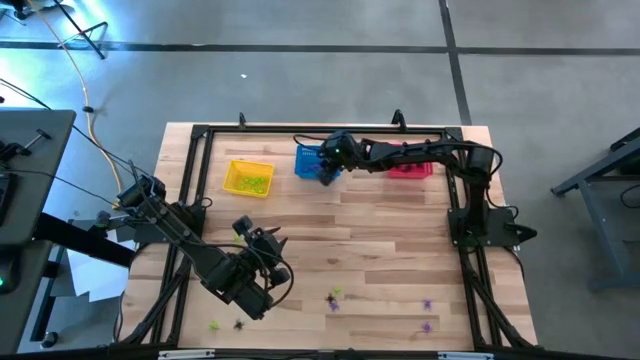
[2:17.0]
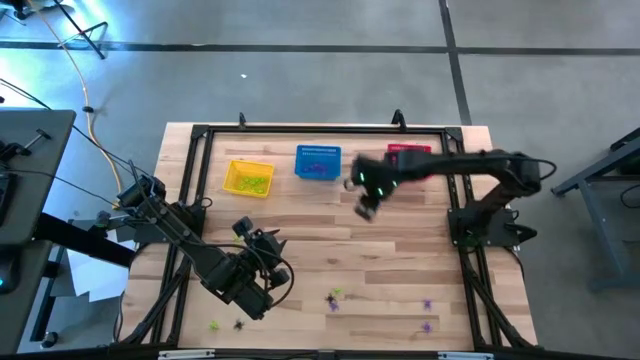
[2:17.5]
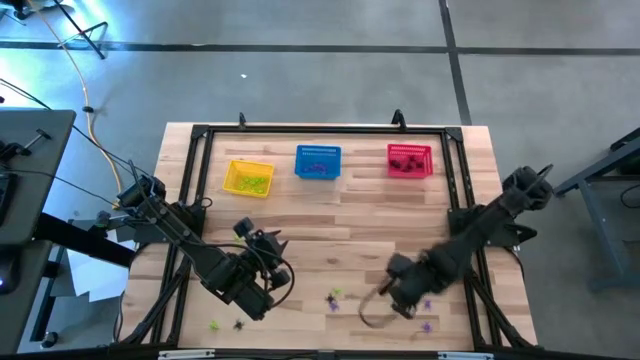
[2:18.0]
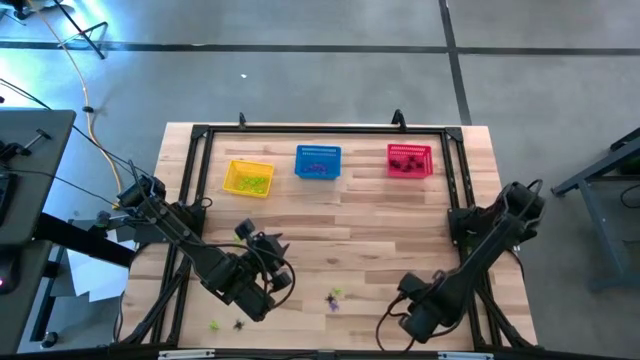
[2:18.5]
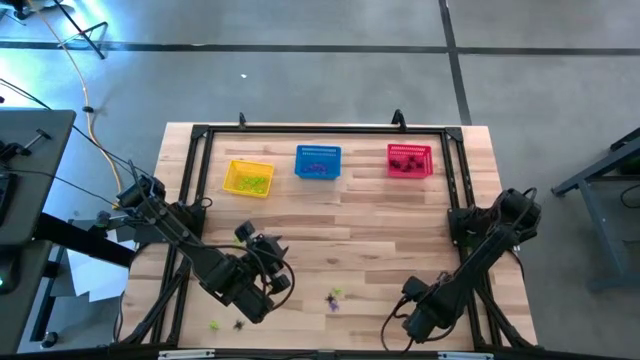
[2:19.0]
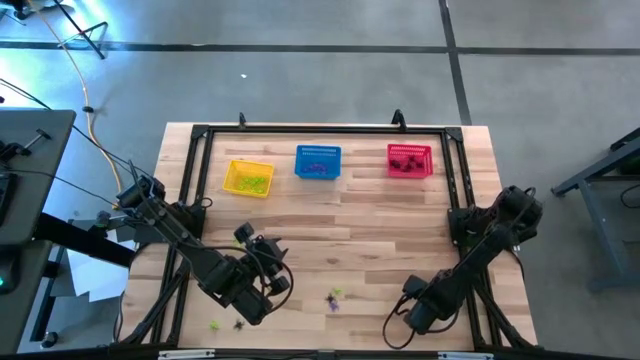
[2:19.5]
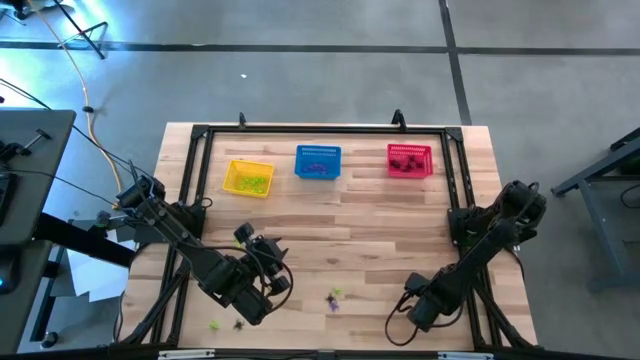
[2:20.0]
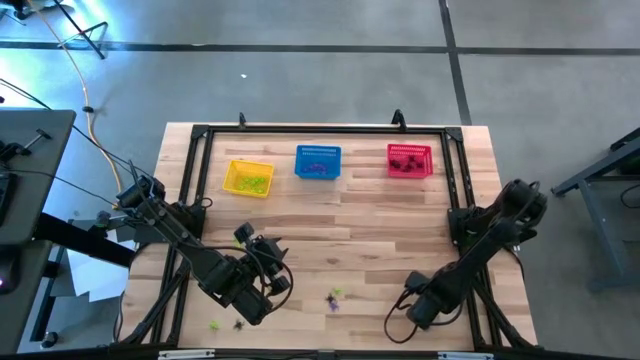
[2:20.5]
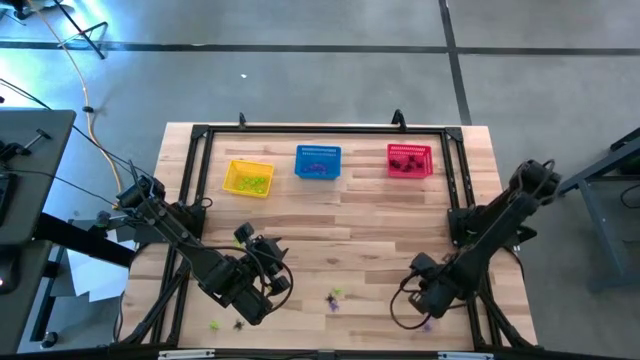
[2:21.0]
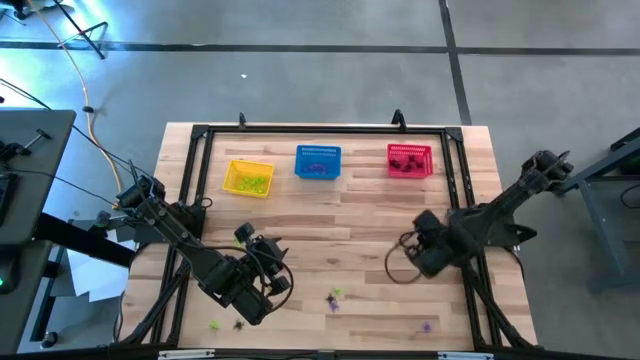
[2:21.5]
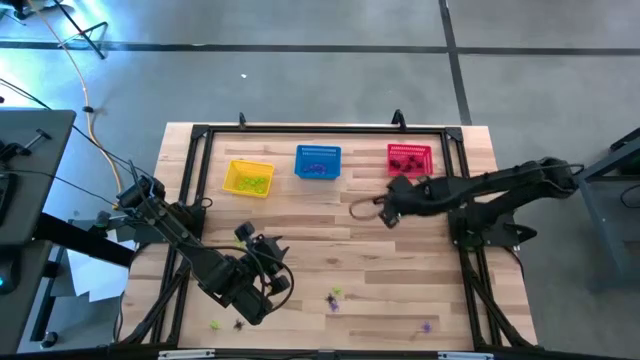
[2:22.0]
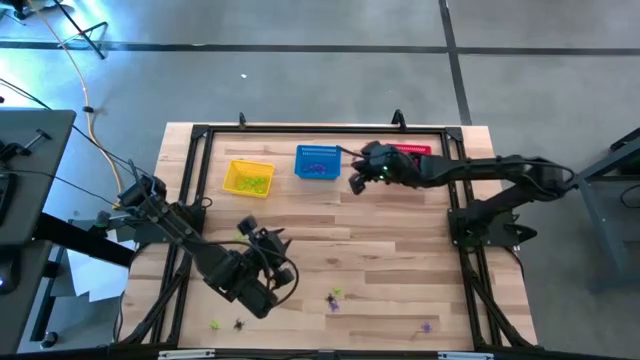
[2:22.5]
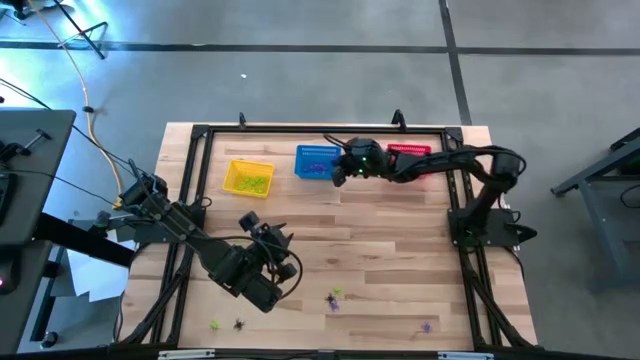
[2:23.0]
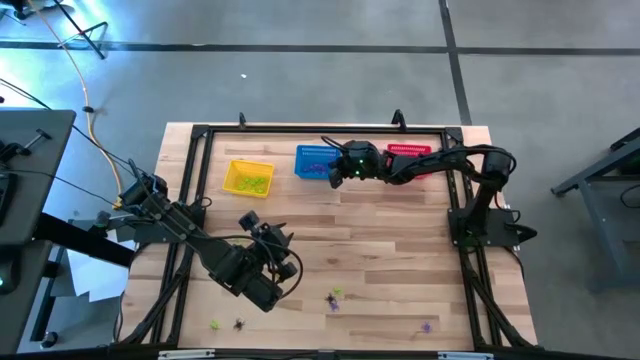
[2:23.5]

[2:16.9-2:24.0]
Task: Sort Halloween decoration
Put the purple spider toy into the blue bin

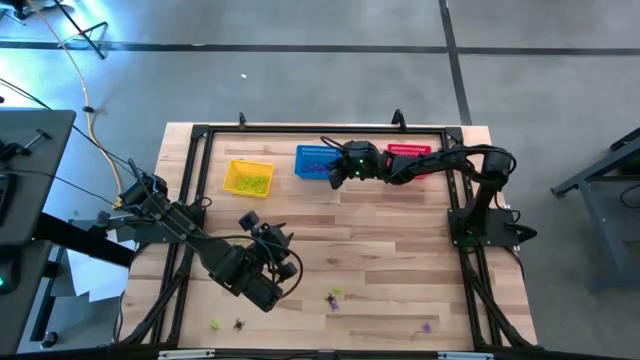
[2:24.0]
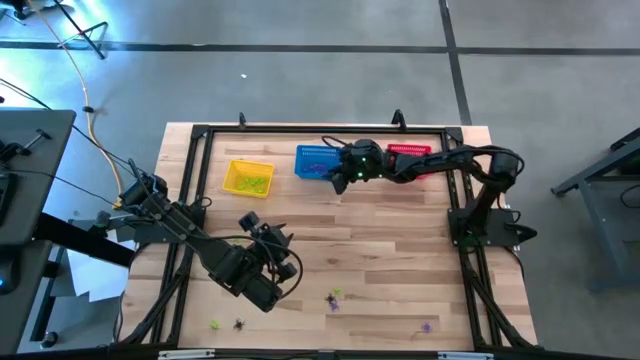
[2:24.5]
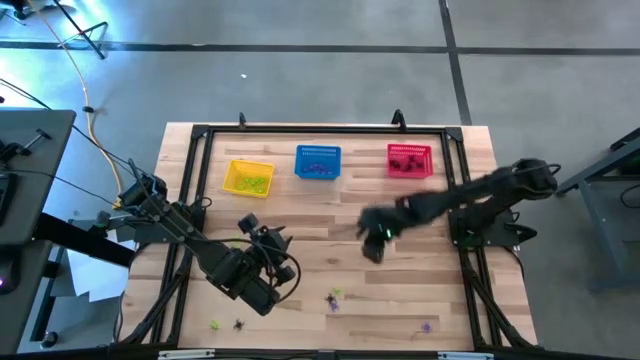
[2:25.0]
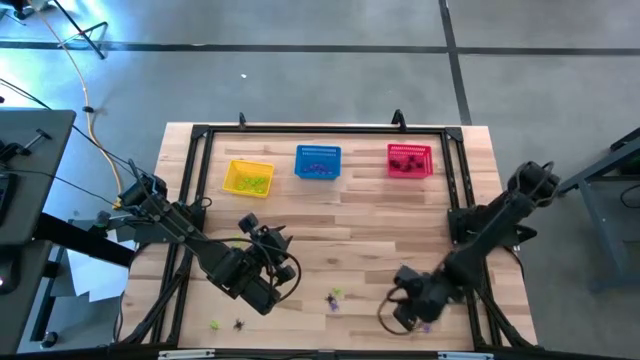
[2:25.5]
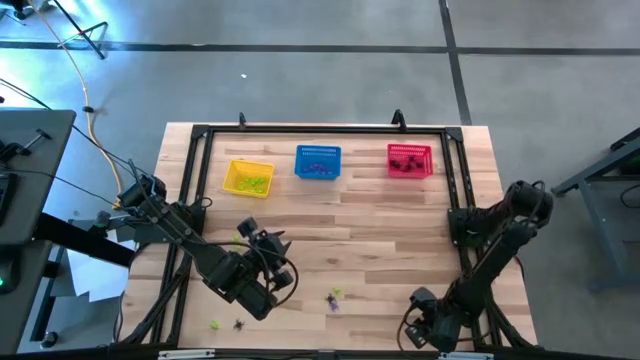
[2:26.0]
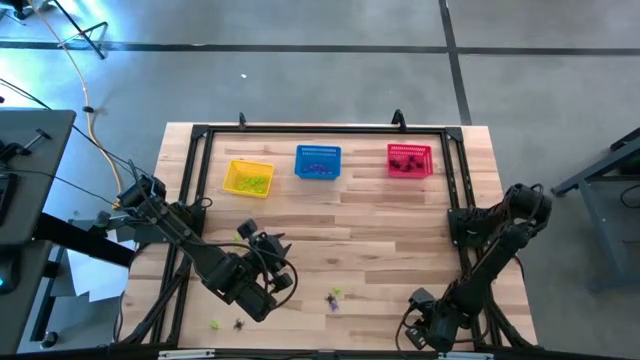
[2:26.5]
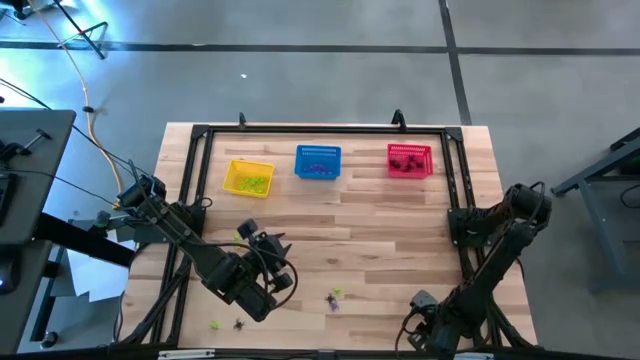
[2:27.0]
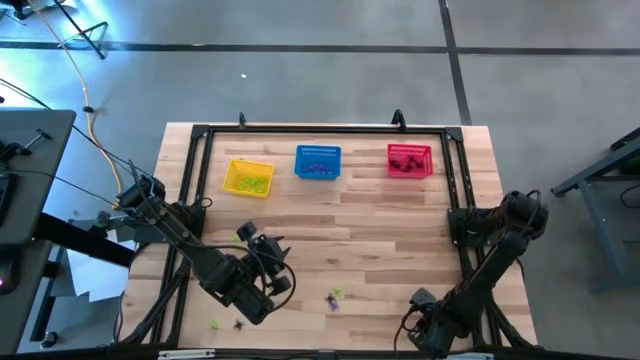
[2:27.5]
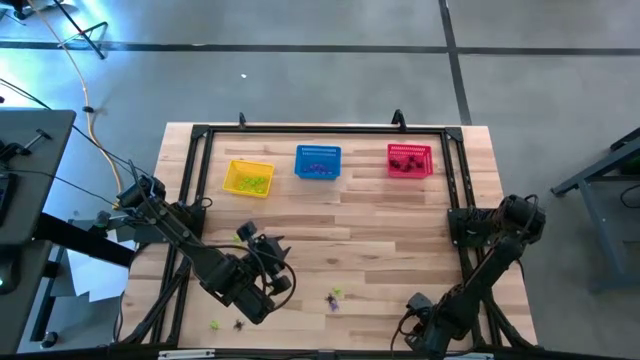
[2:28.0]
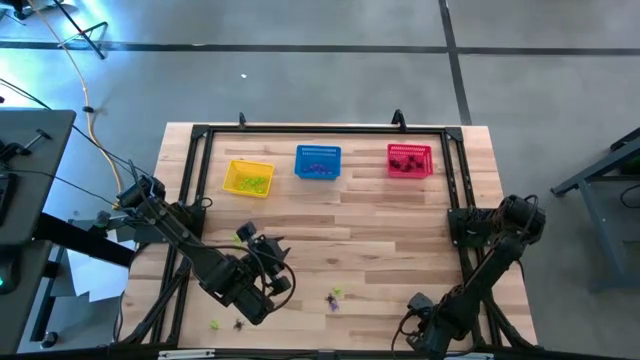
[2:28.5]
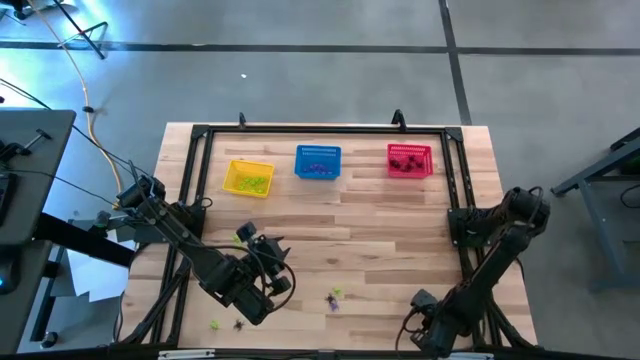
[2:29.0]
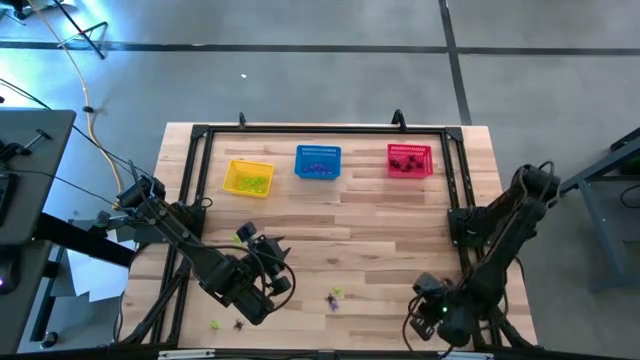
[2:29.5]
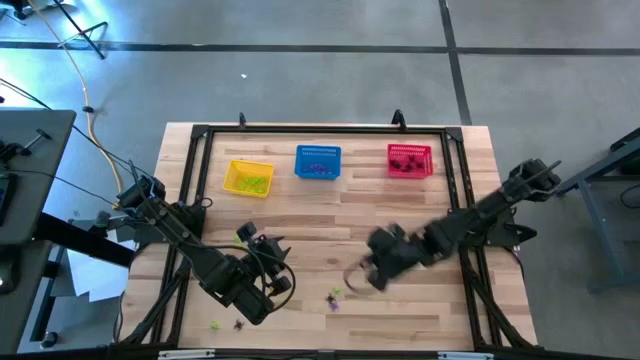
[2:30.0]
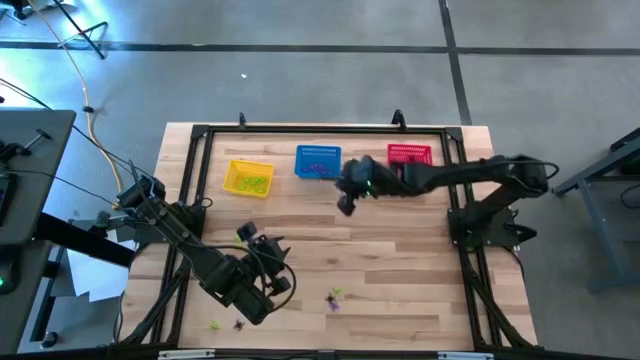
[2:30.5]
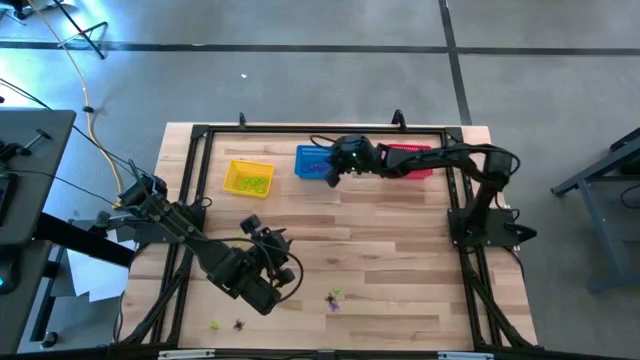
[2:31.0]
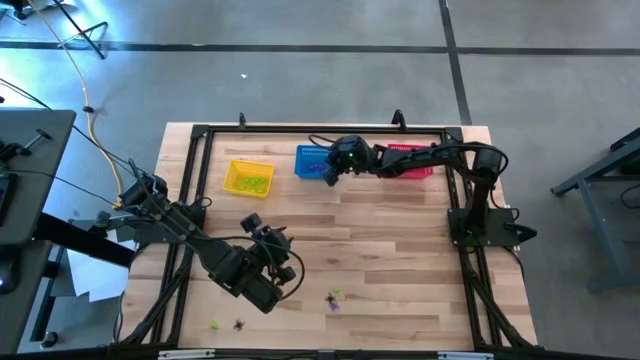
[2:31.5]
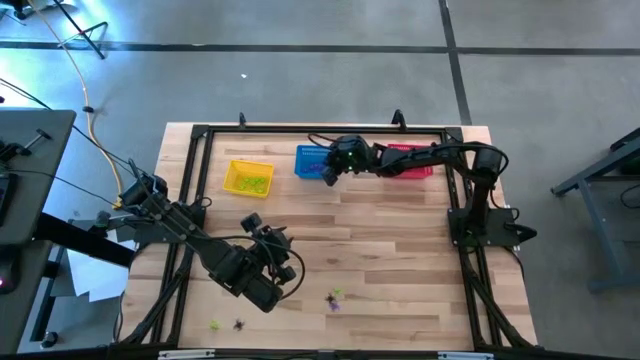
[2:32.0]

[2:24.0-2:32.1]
Put the purple spider toy into the blue bin

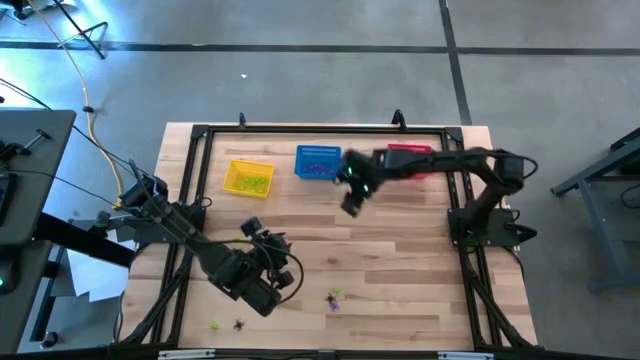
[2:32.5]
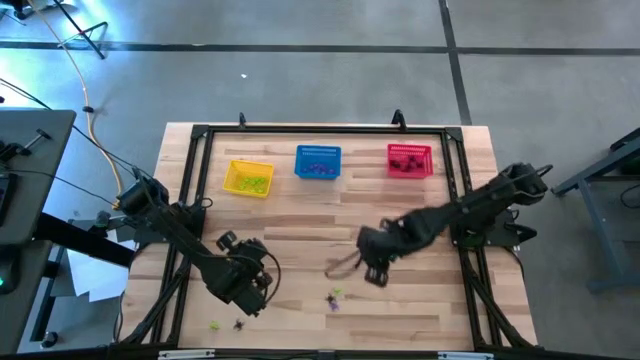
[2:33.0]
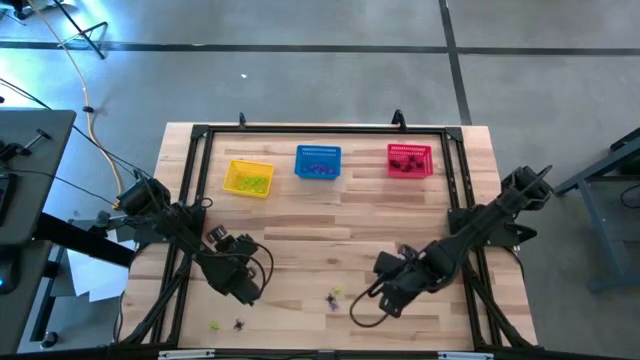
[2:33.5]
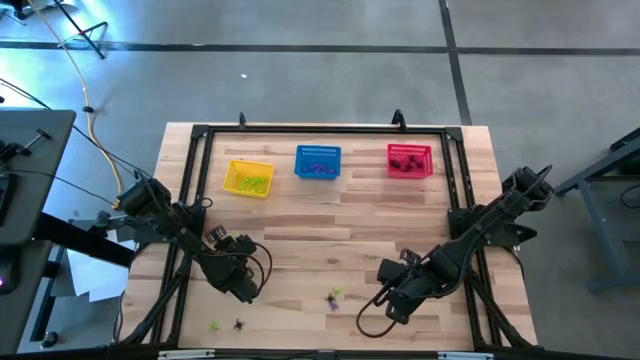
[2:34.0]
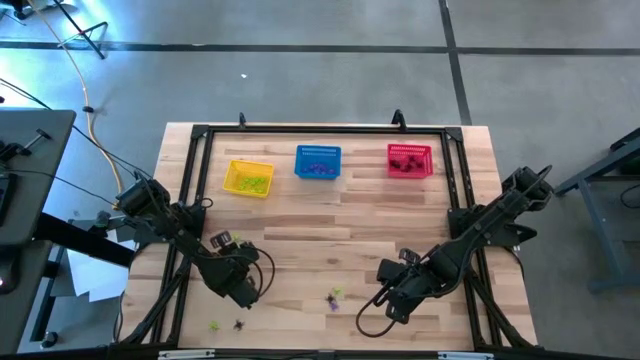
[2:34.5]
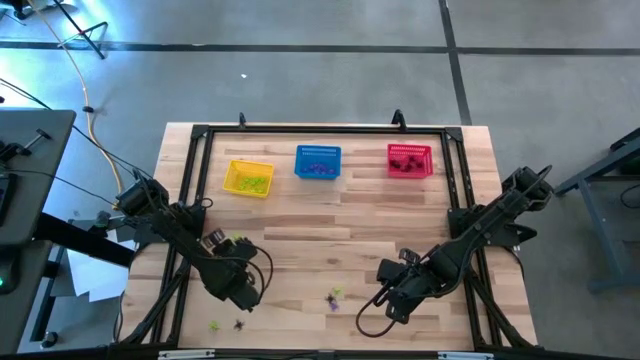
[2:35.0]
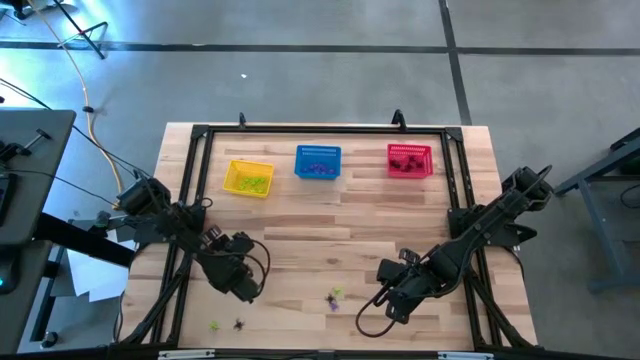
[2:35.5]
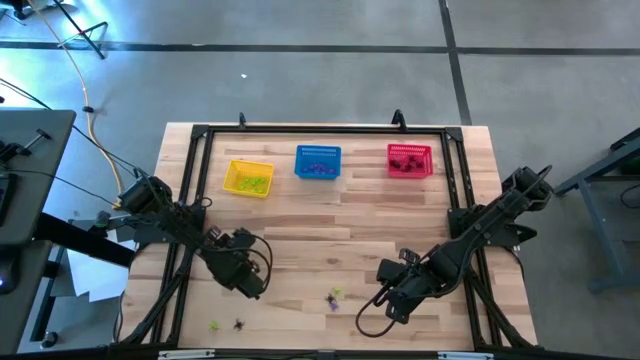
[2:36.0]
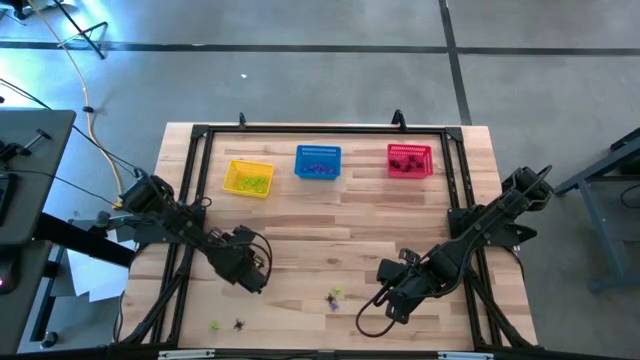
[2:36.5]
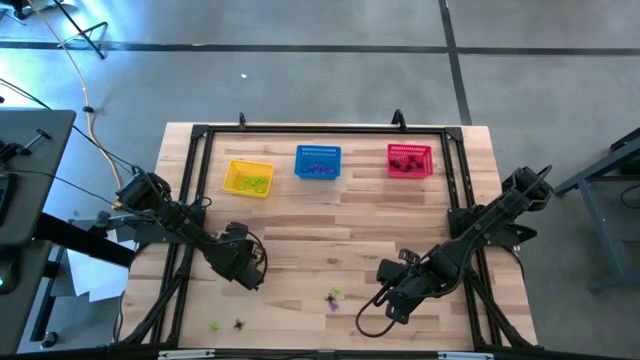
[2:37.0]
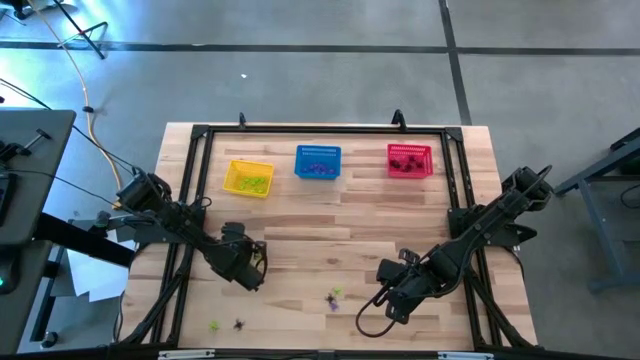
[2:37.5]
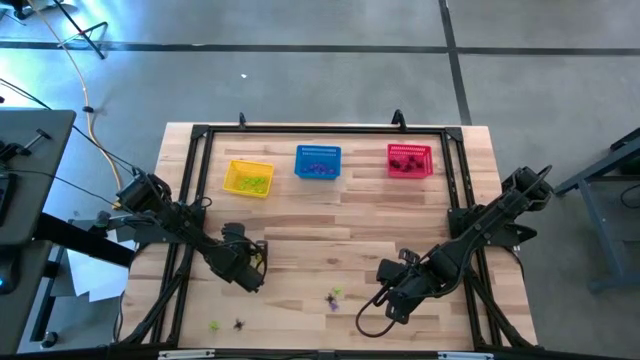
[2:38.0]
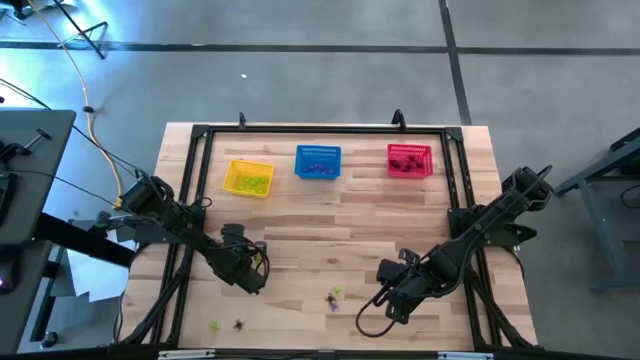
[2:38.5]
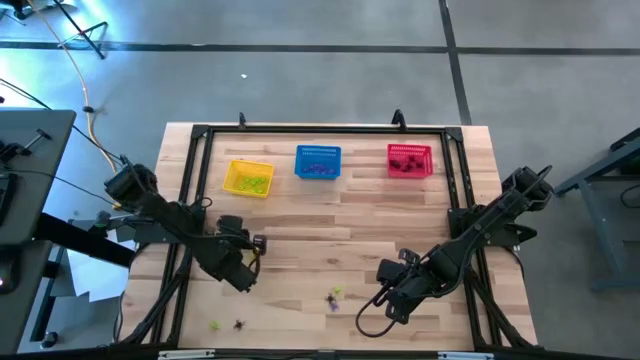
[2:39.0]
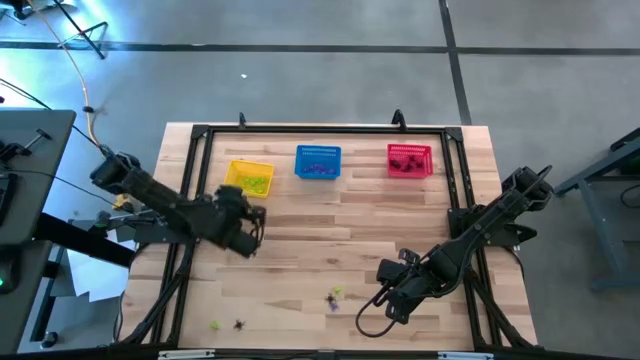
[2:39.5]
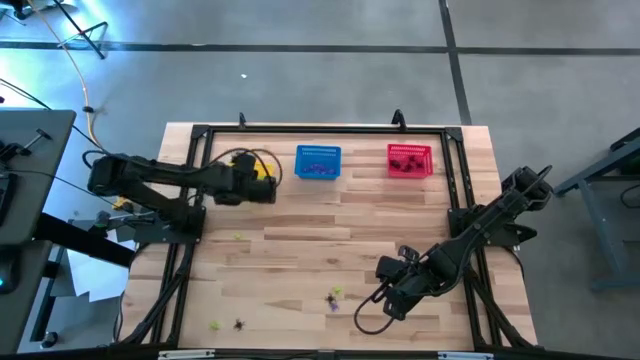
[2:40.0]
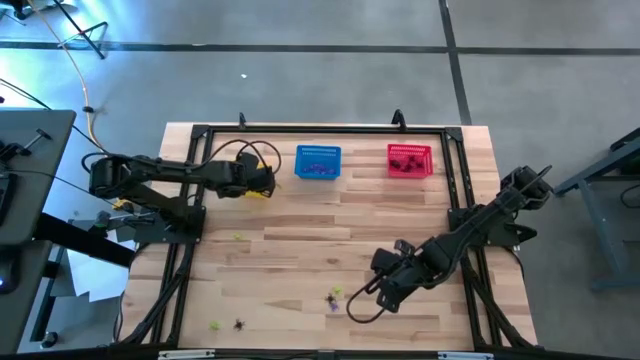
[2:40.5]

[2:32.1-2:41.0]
Put the green spider toy into the yellow bin
